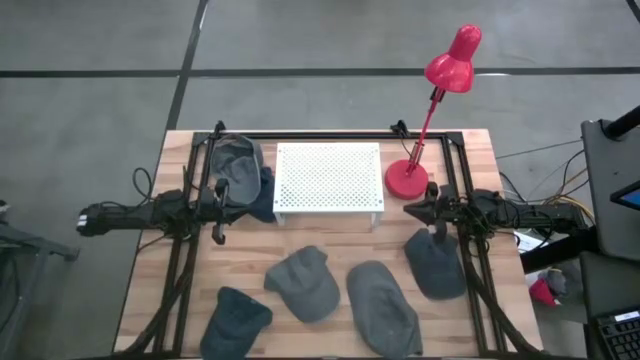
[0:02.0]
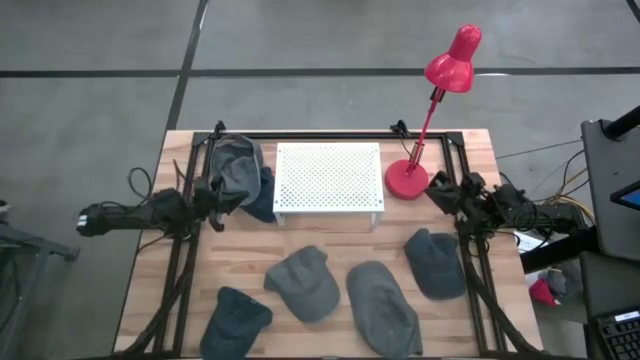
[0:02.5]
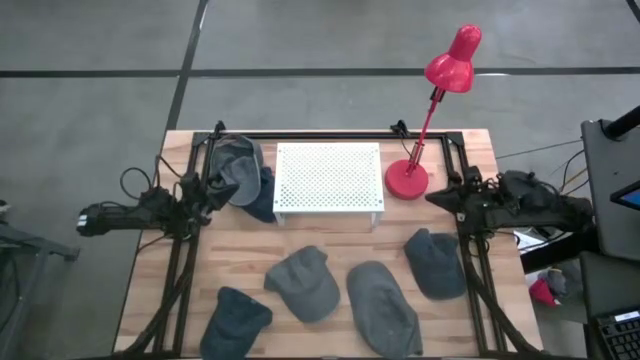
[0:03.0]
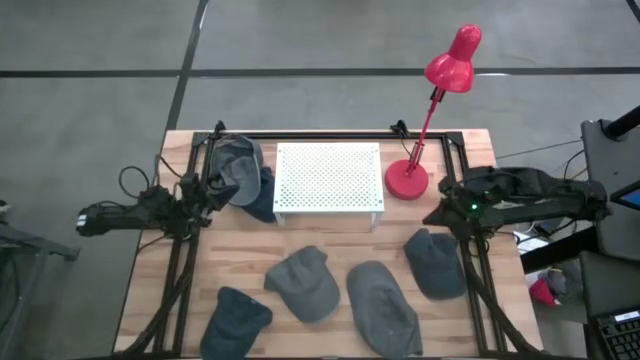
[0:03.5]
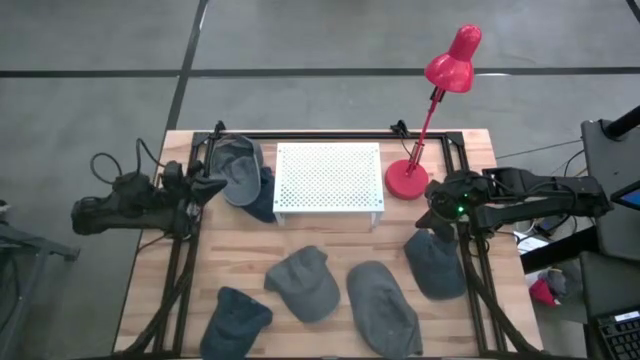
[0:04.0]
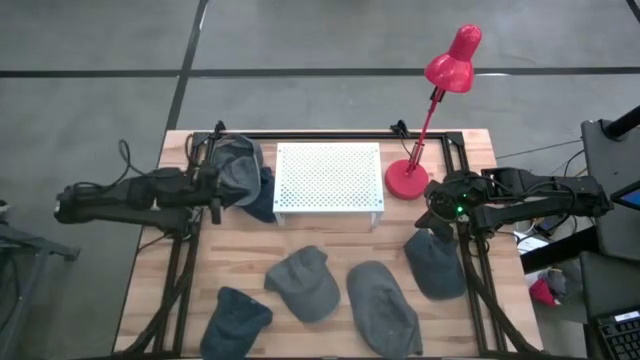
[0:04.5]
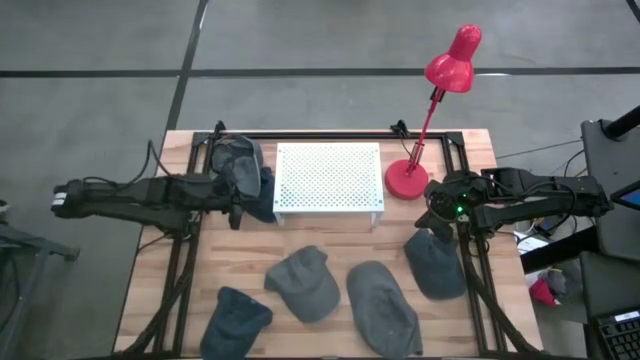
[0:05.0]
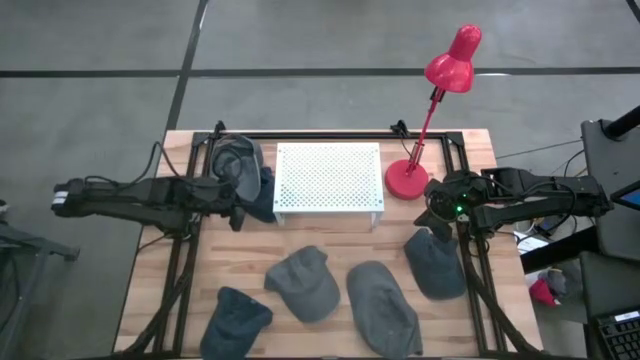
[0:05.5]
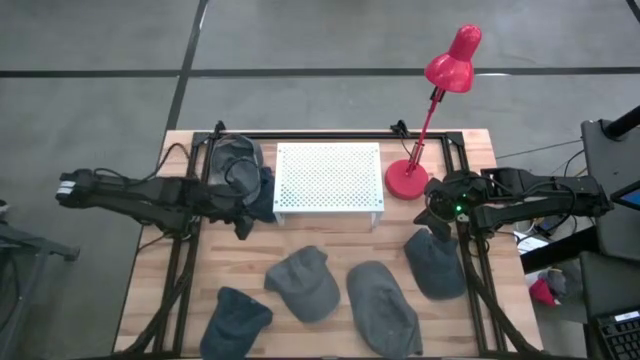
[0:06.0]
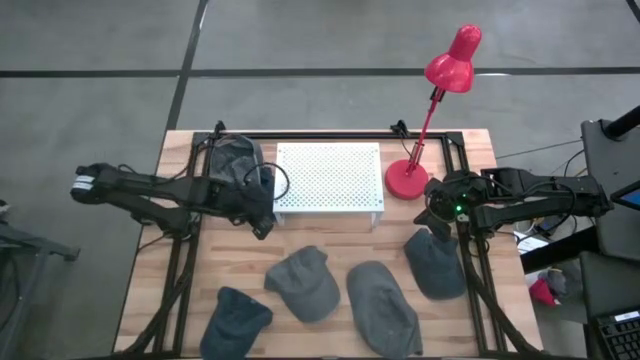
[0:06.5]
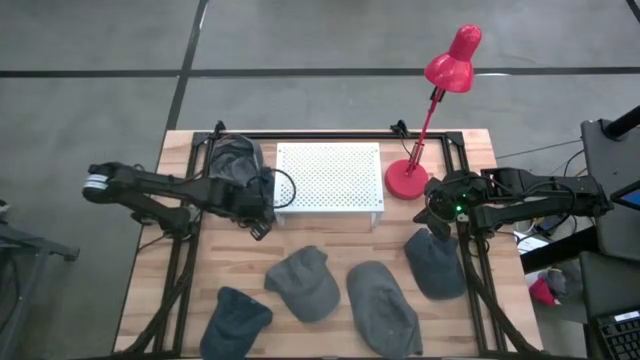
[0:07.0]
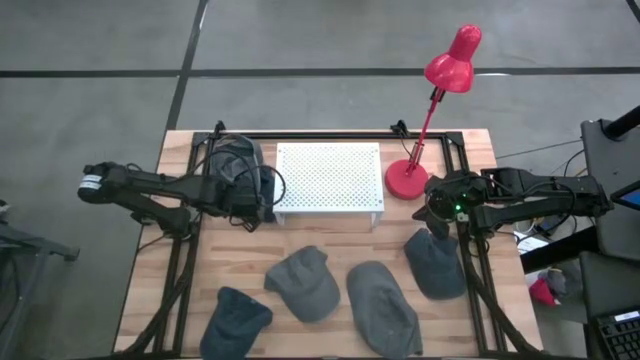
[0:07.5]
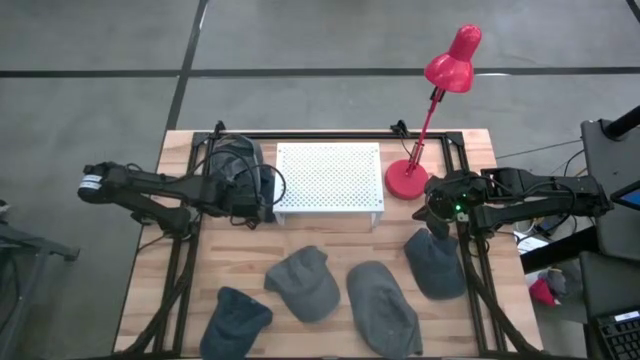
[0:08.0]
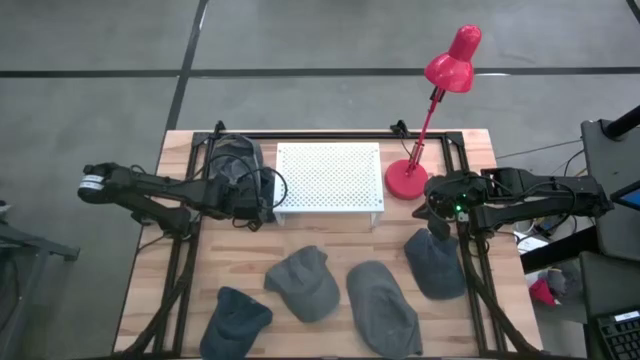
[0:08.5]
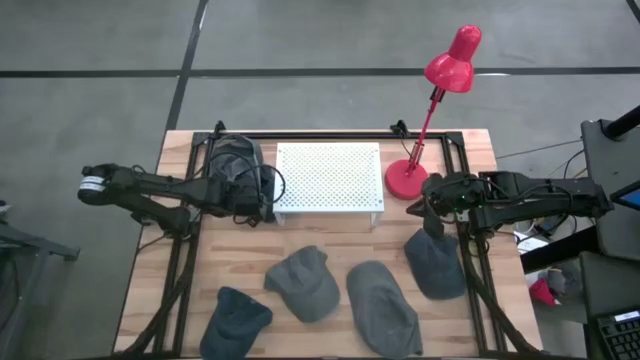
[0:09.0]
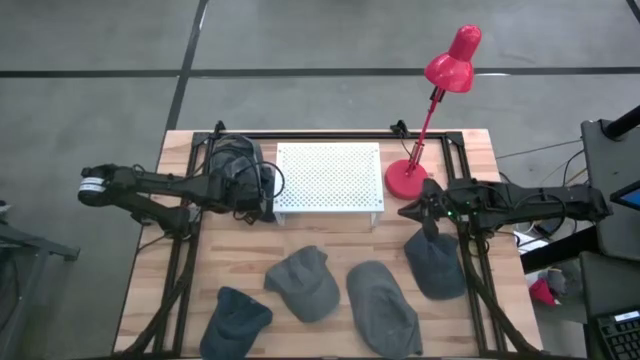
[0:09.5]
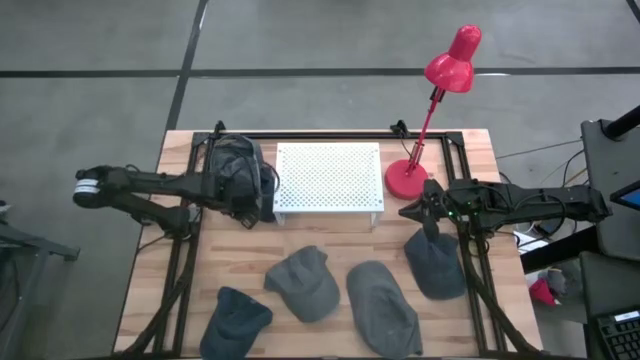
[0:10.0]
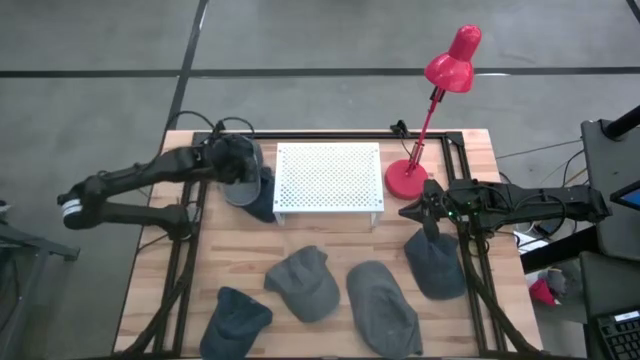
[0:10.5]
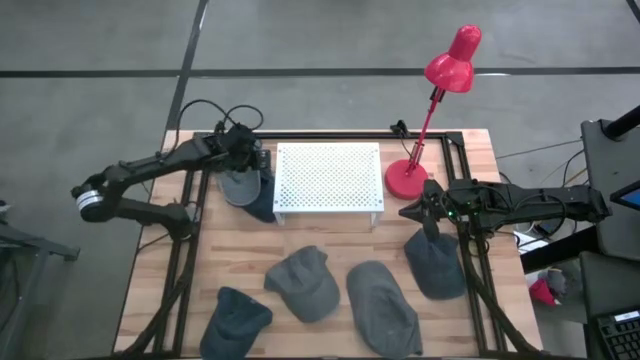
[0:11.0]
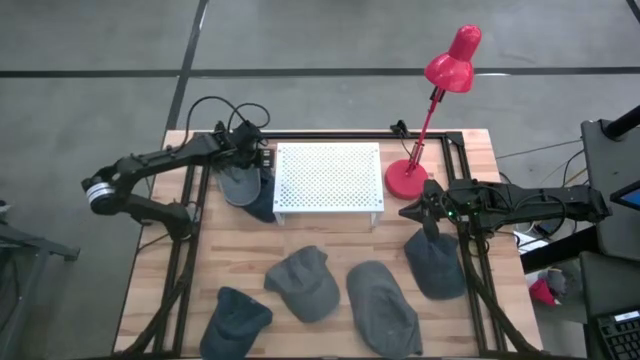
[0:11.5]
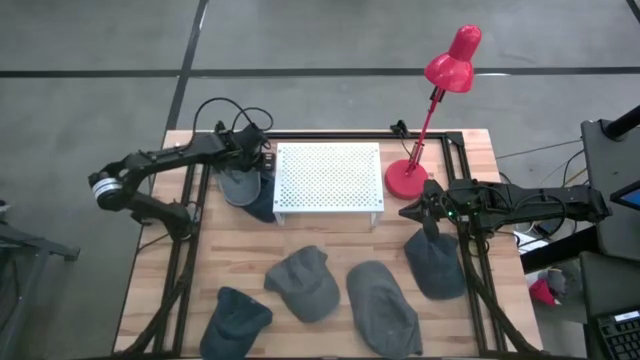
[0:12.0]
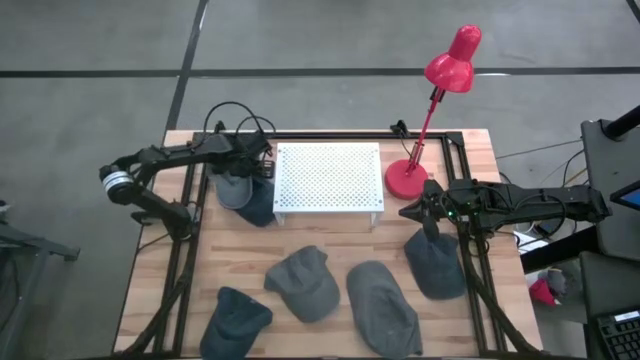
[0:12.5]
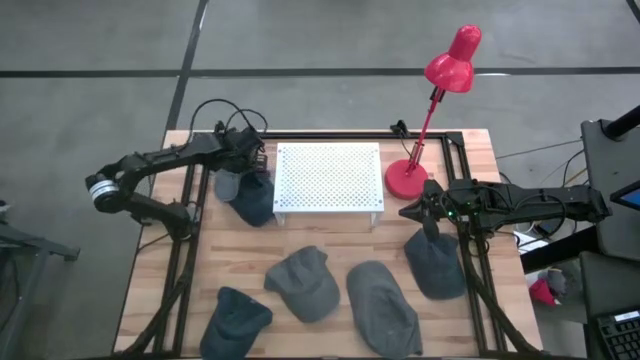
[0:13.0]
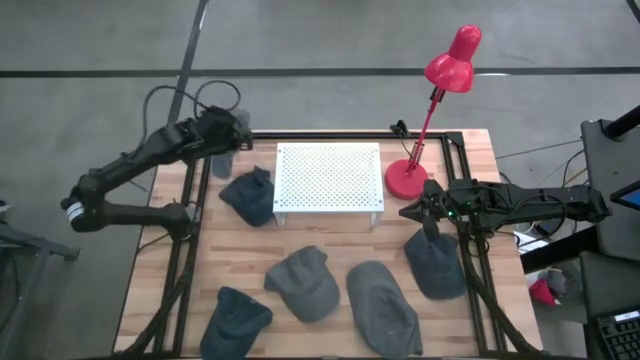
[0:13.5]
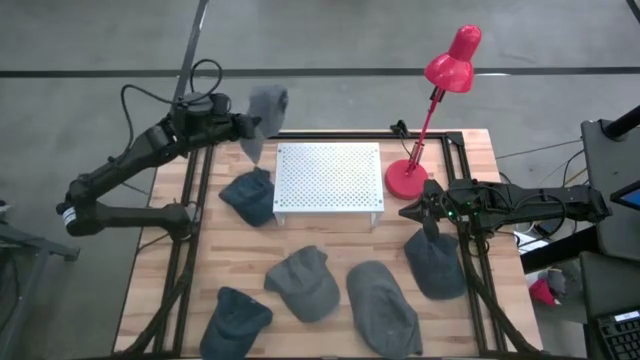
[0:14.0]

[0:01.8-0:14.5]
Task: Pick & Place hat
Put the top left gray cap on the shelf

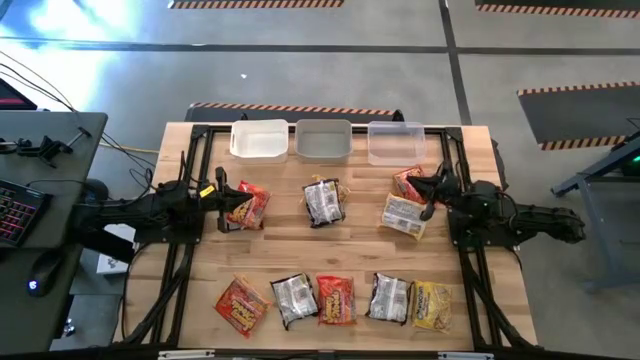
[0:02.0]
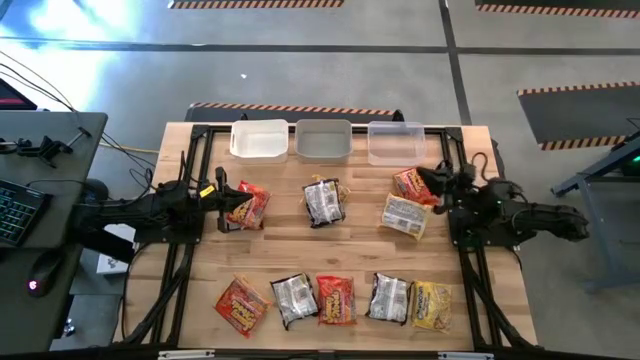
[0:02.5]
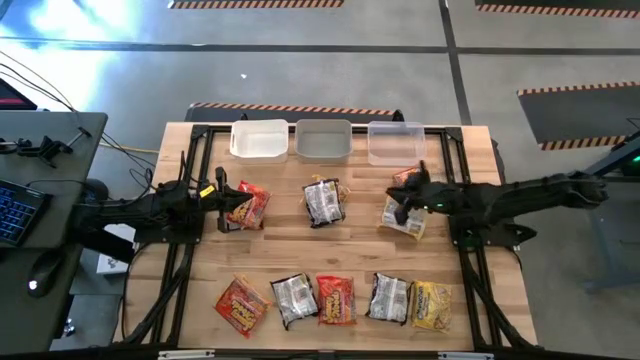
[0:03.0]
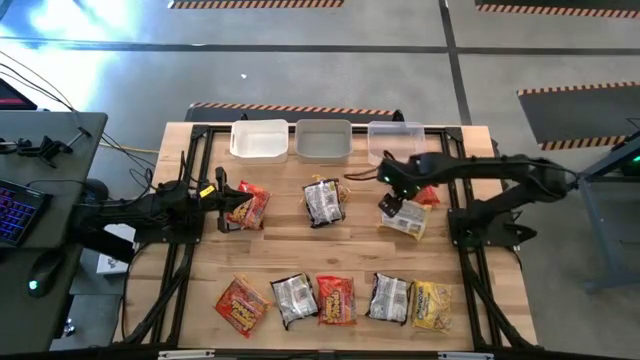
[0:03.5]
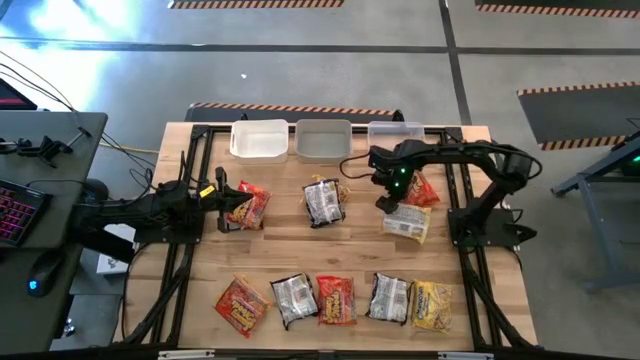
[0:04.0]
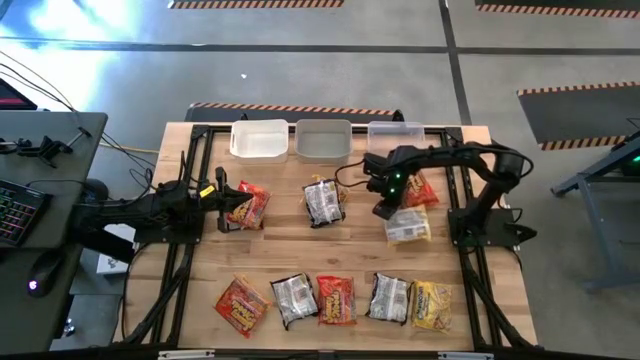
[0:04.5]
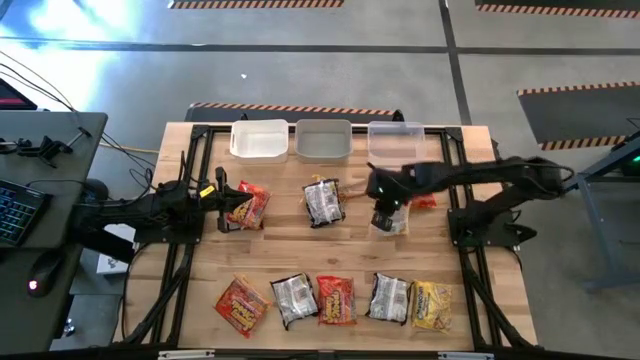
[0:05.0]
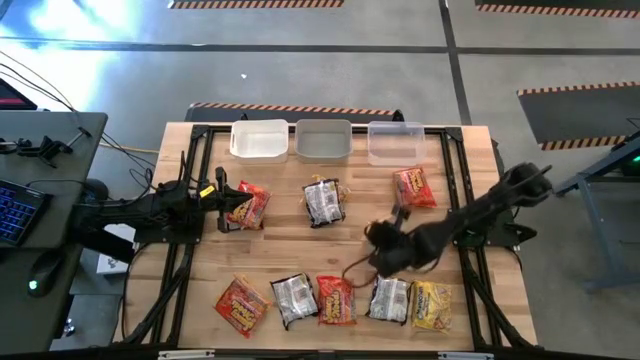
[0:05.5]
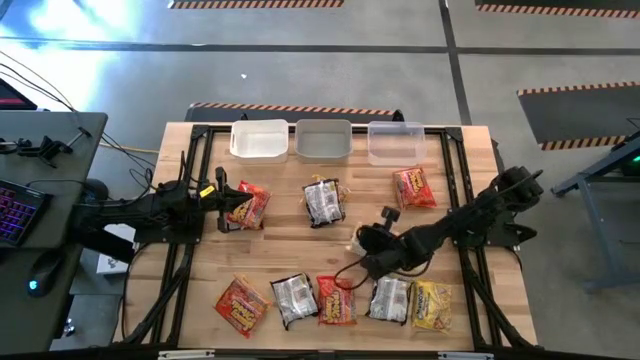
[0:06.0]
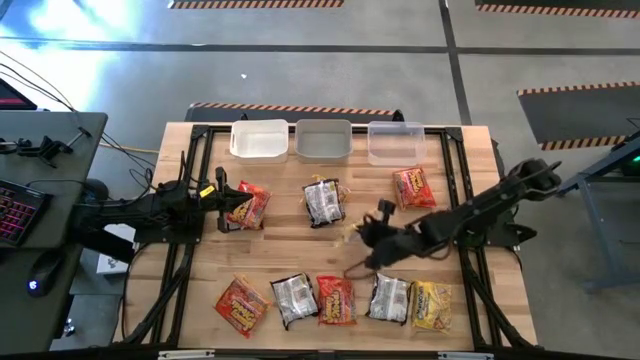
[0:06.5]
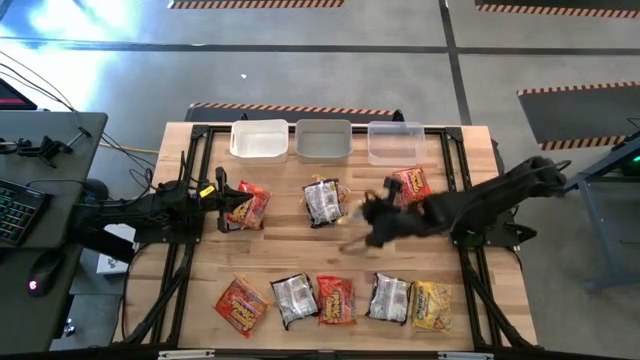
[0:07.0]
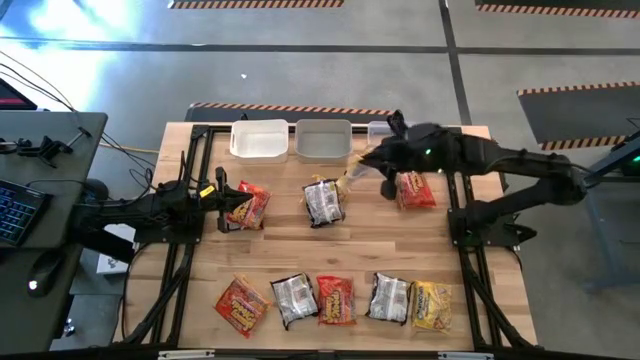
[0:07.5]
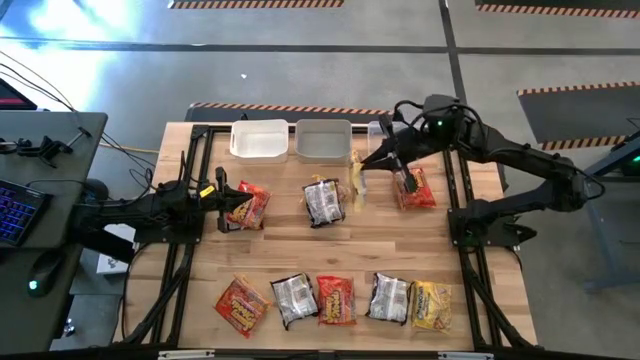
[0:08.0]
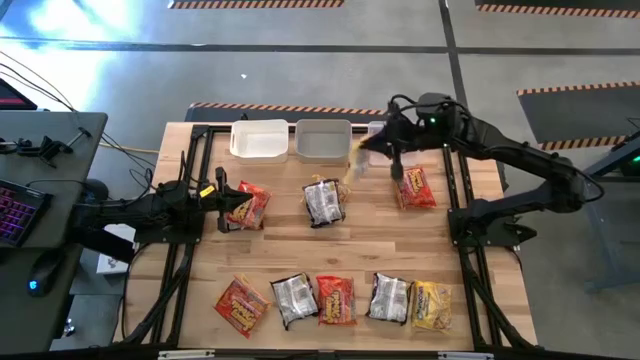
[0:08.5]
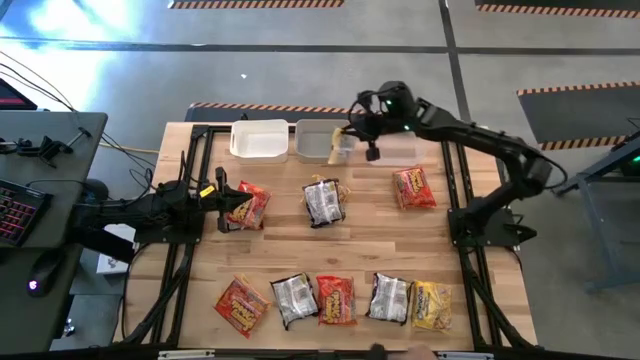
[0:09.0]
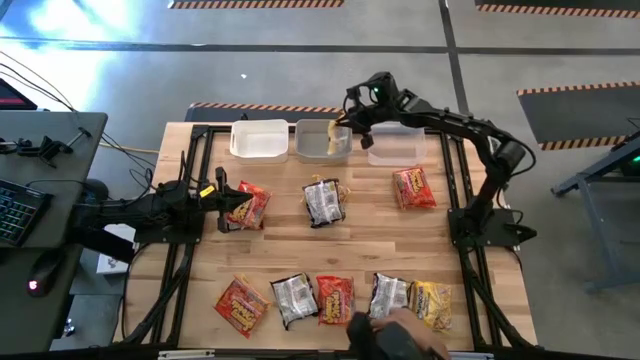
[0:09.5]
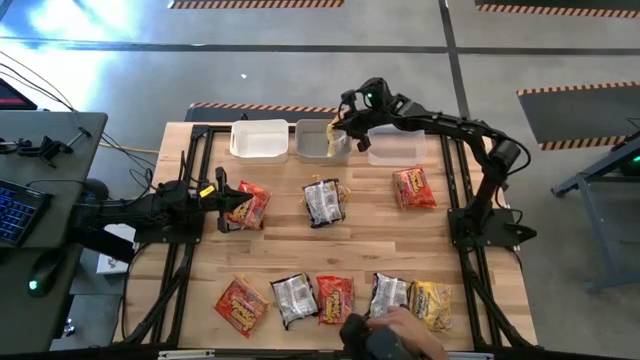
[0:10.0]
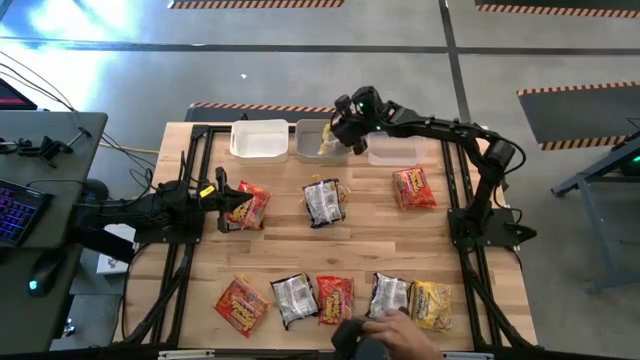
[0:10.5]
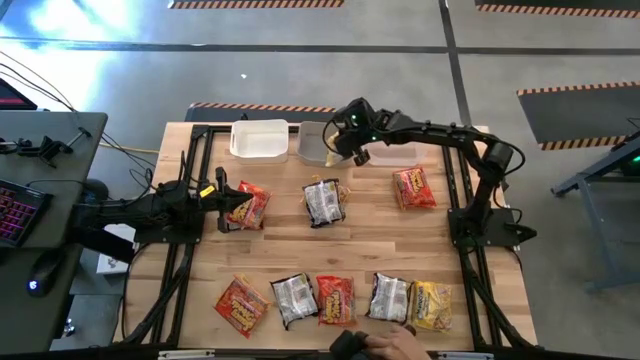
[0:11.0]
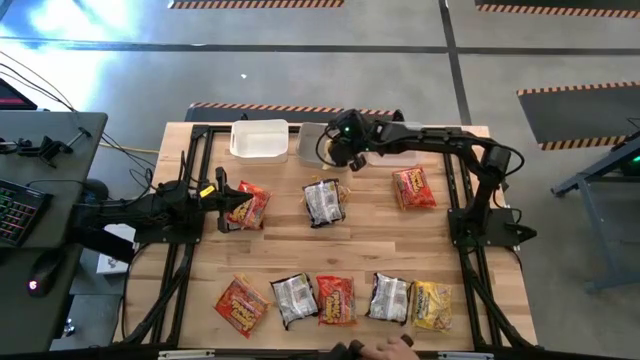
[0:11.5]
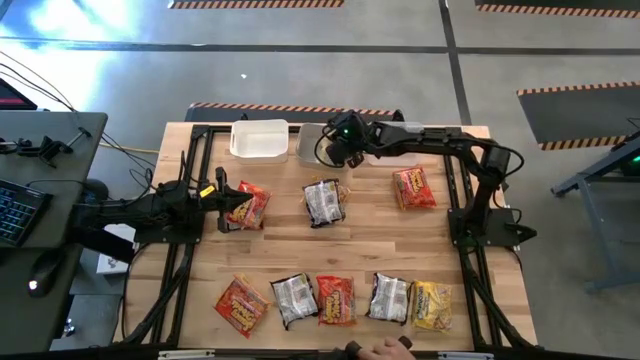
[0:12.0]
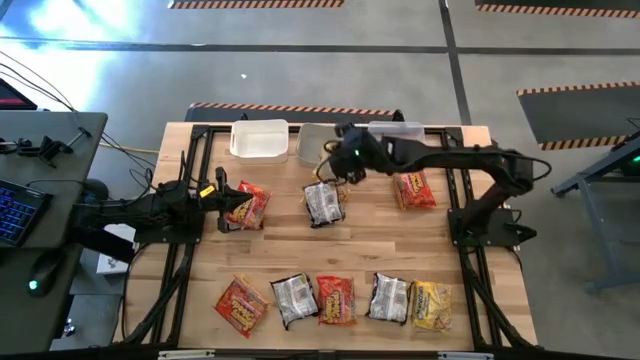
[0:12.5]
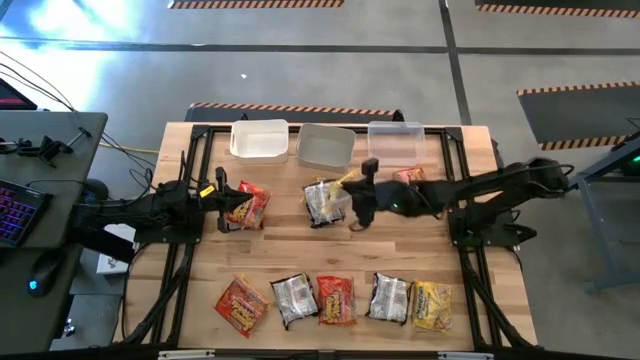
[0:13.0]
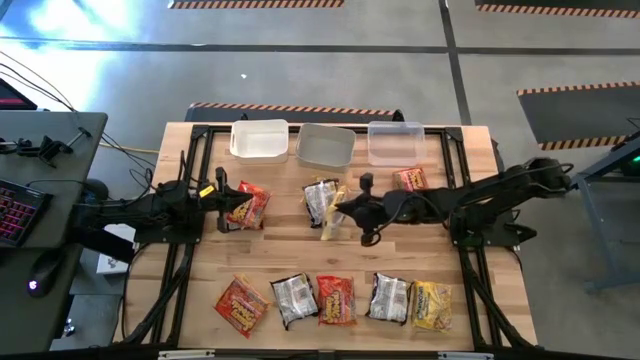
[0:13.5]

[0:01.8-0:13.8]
Task: Sort Maruchan noodles
Put the yellow noodle pack into the transparent bin
